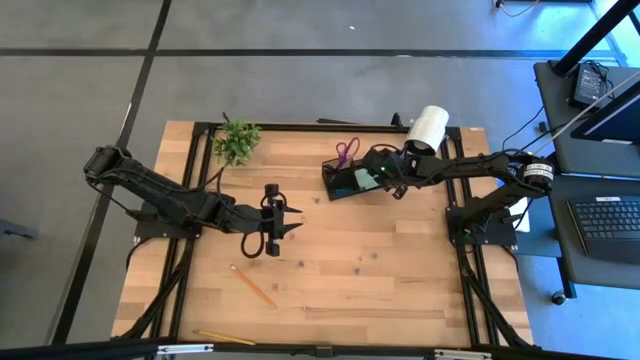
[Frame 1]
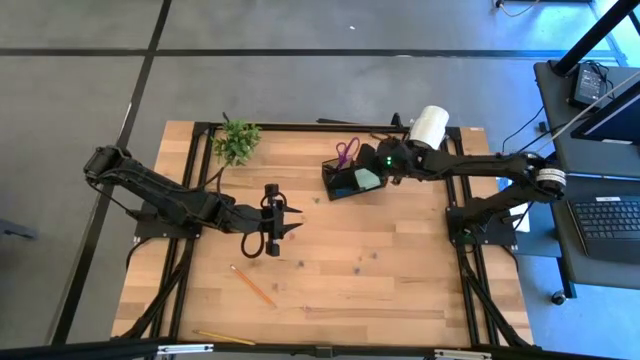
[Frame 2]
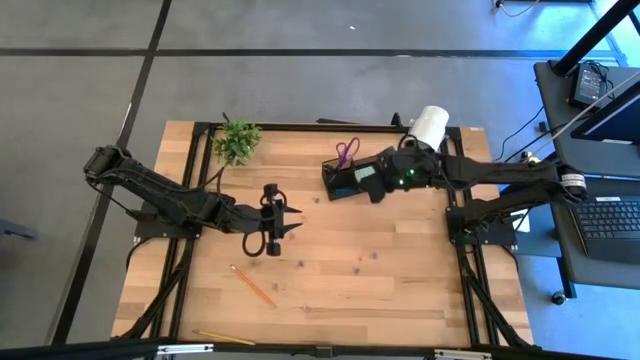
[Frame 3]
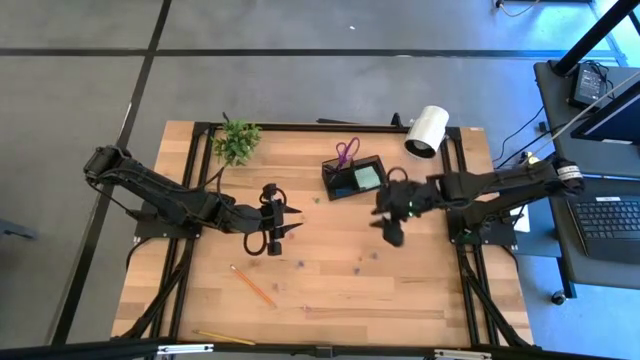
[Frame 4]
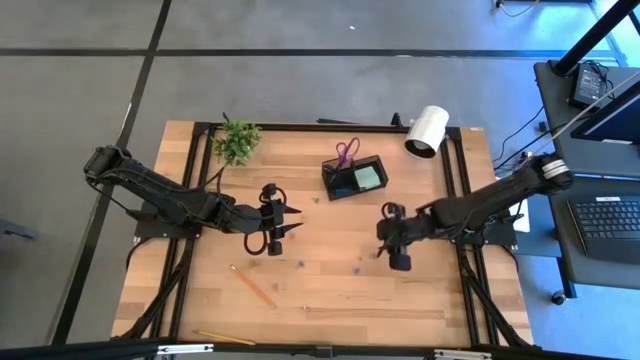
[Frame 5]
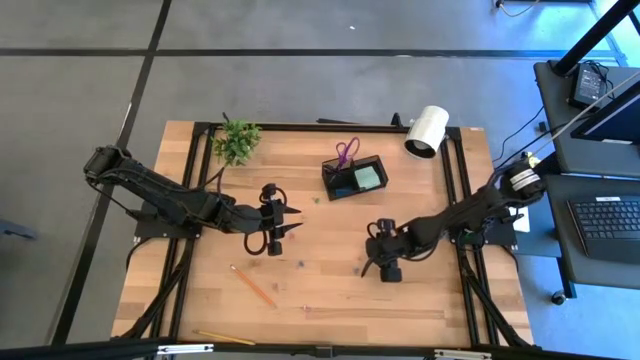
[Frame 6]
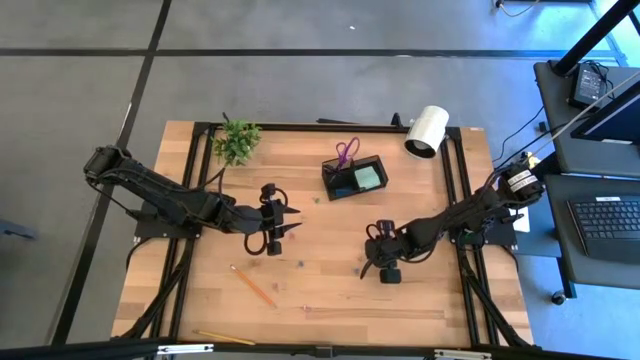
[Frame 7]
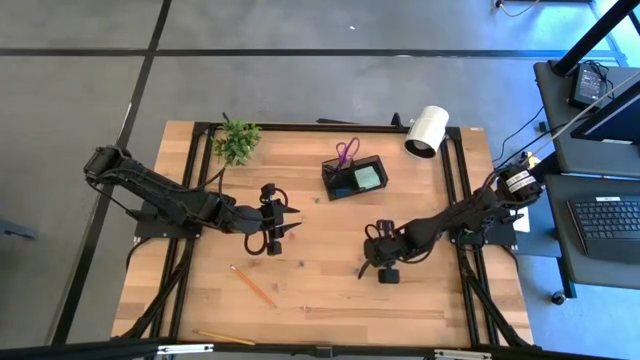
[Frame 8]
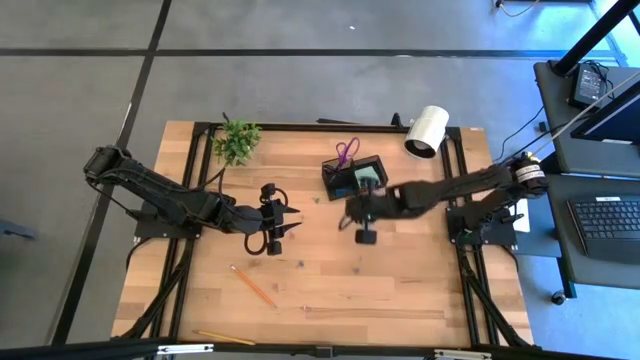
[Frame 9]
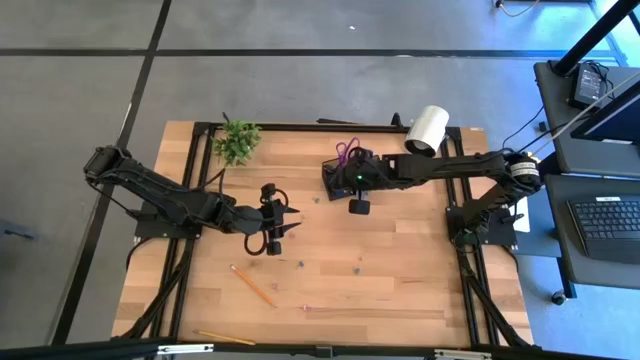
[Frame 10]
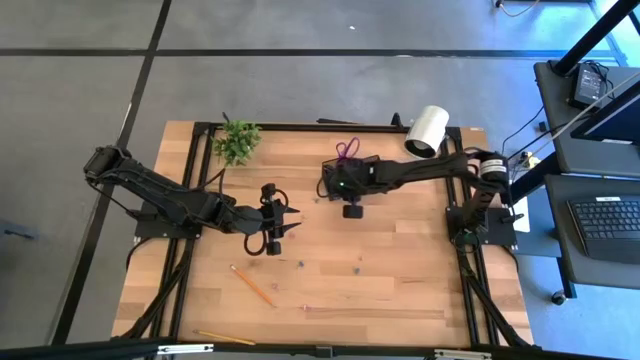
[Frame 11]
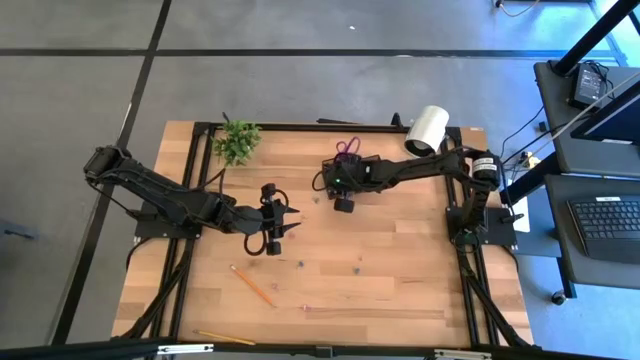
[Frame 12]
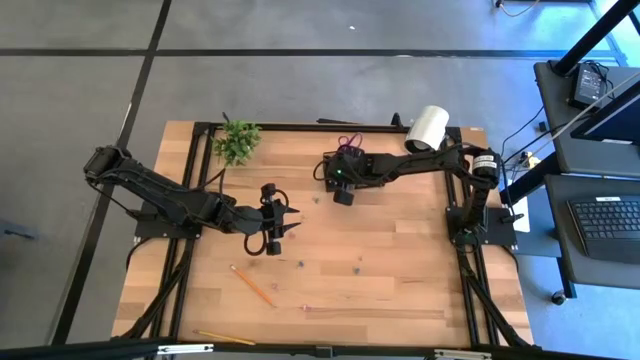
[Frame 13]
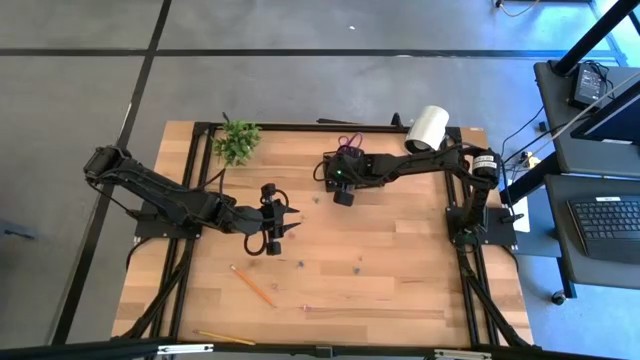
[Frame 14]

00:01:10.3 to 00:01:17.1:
Task: Pick and place office supplies into organizer
Put the blue binder clip into the black desk organizer

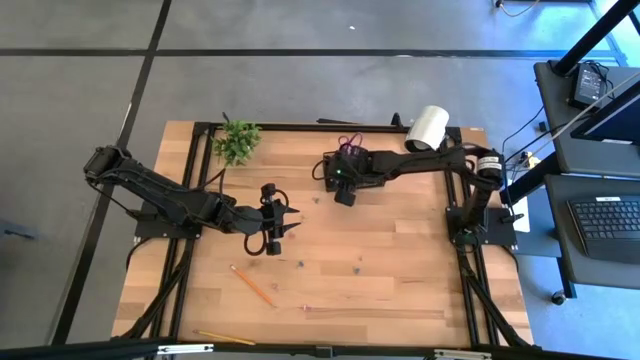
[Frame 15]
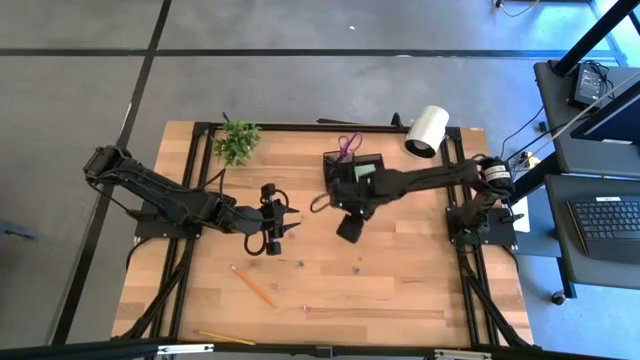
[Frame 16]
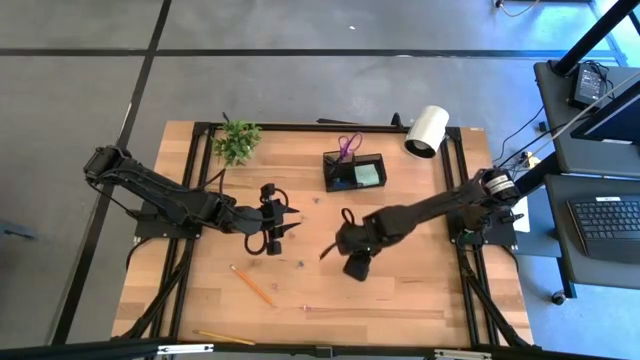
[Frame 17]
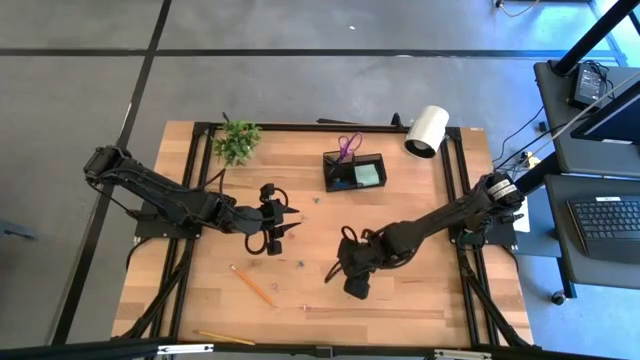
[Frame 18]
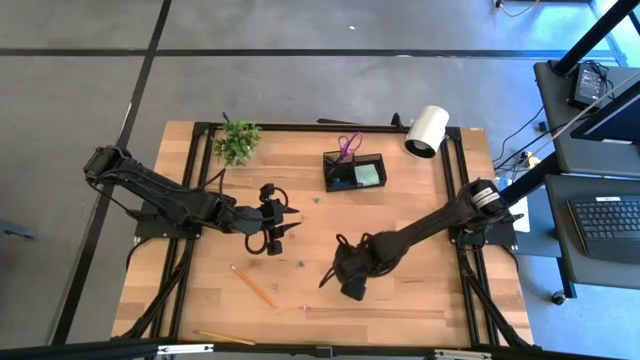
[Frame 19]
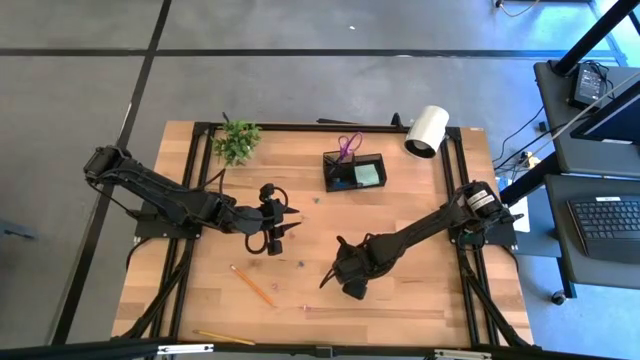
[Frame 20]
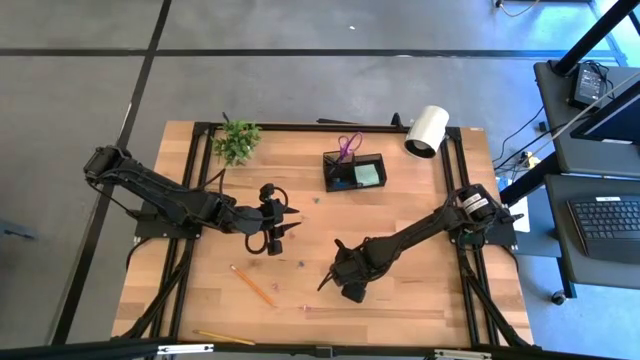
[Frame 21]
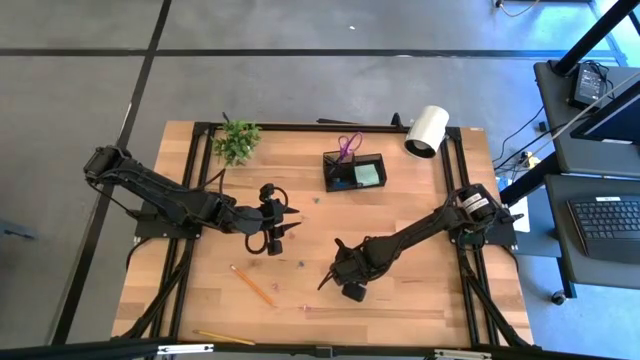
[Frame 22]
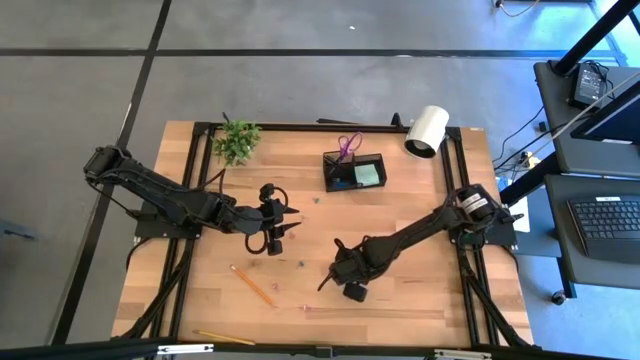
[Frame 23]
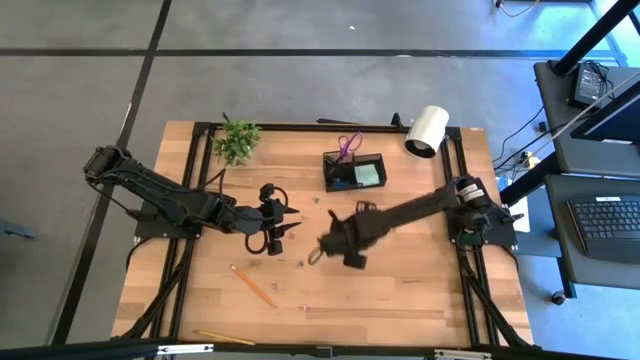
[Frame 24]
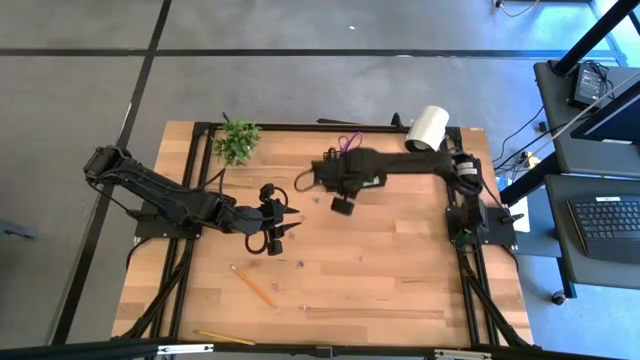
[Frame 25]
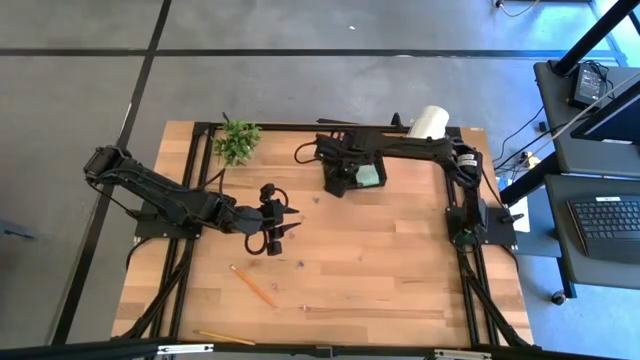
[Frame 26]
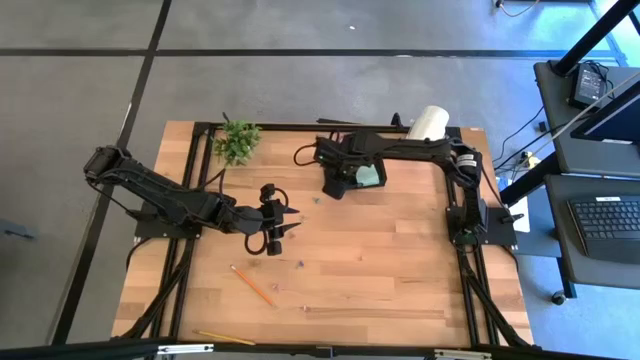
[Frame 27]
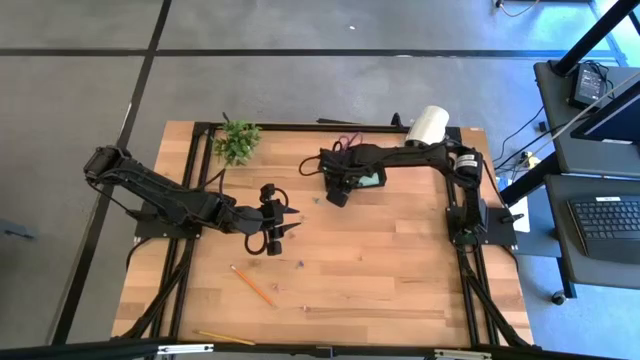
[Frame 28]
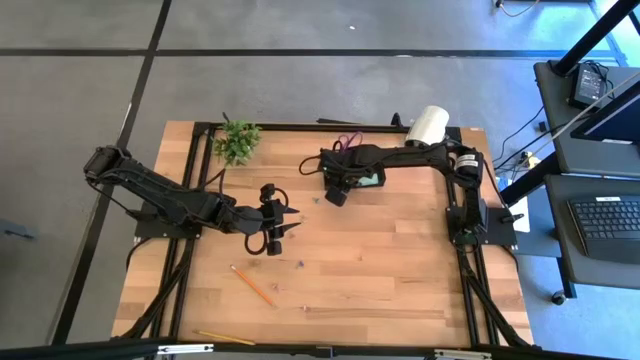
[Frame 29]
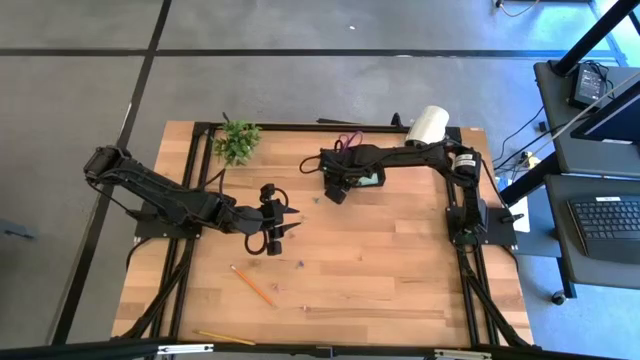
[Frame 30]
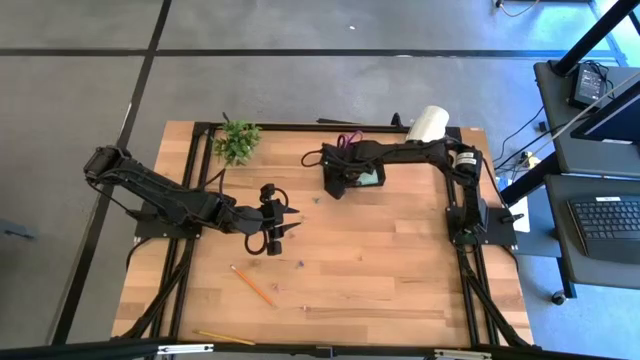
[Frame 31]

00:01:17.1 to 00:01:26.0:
Put the blue binder clip into the black desk organizer

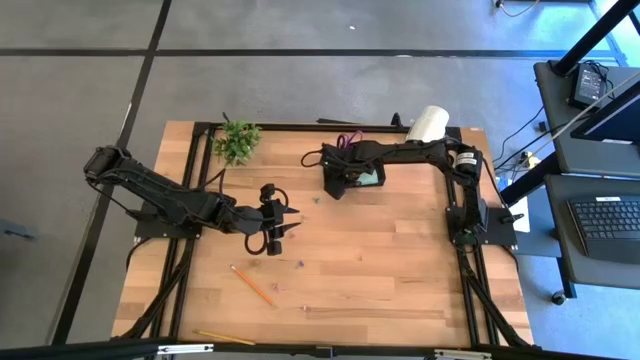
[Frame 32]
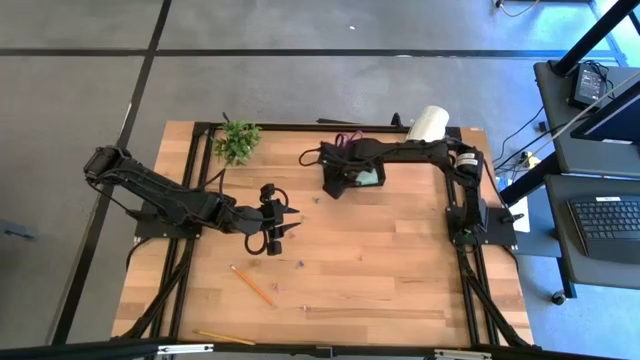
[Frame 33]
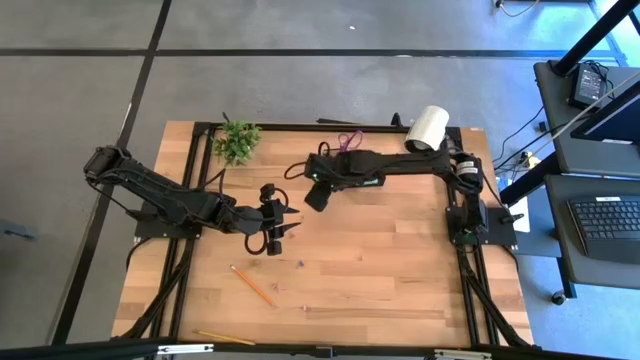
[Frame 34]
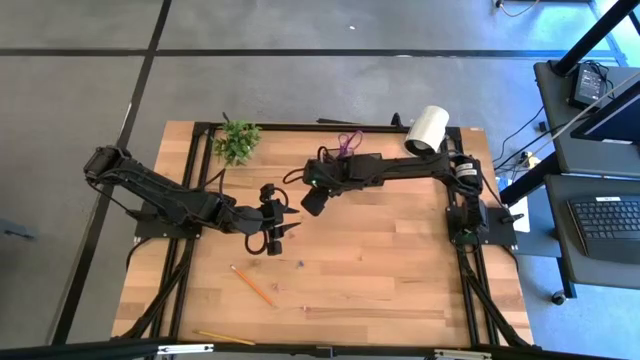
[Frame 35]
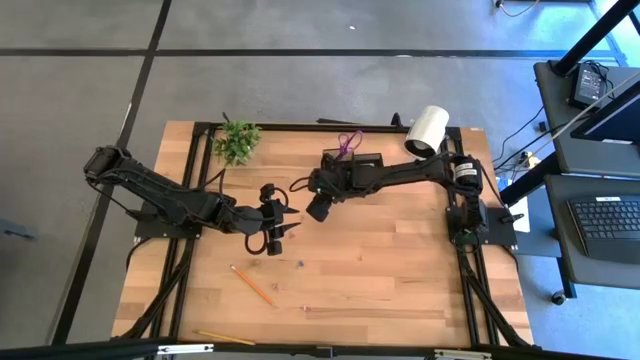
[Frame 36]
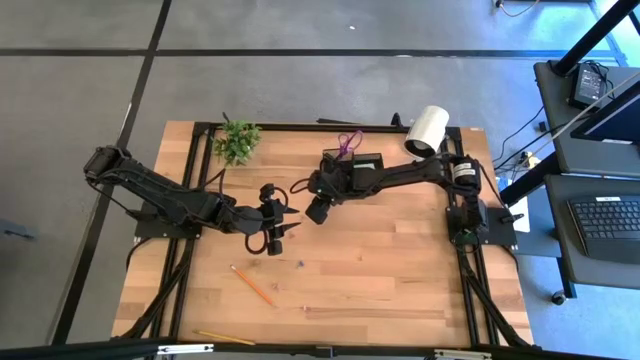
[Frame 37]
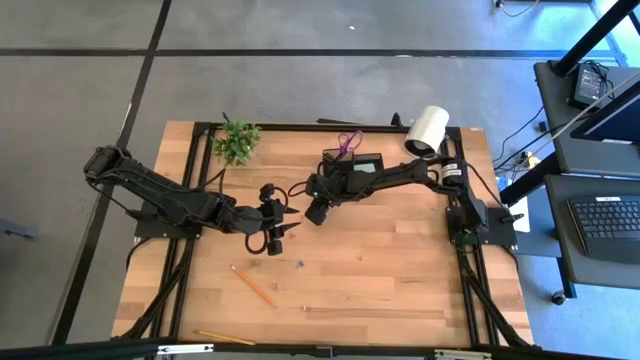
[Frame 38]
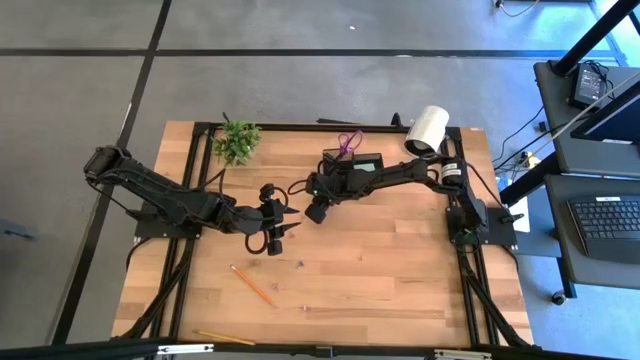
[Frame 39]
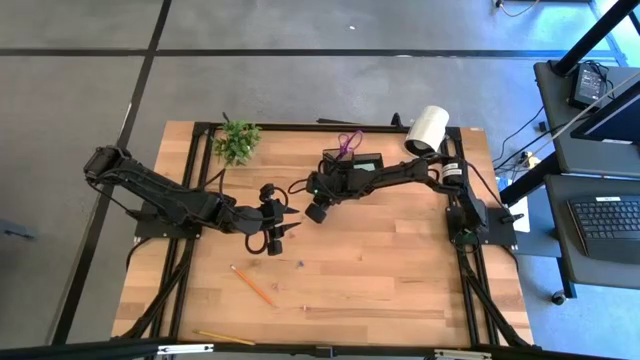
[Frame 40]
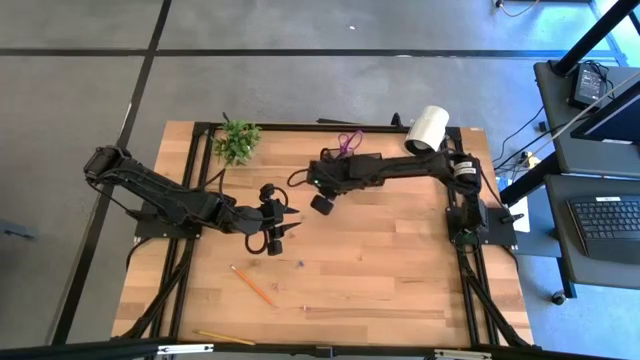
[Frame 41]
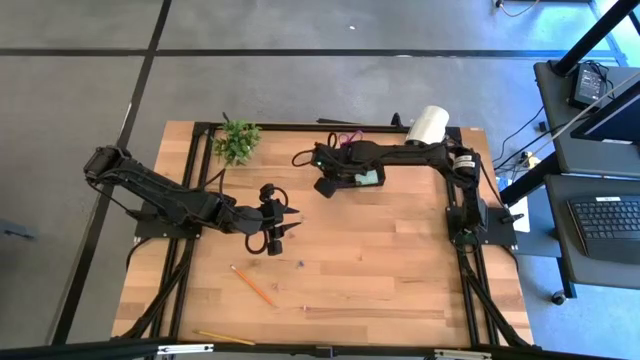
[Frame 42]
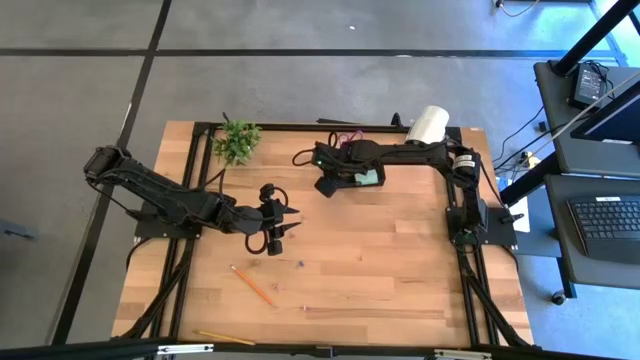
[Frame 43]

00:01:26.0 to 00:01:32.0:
Put the blue binder clip into the black desk organizer
